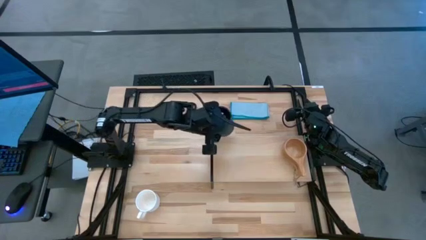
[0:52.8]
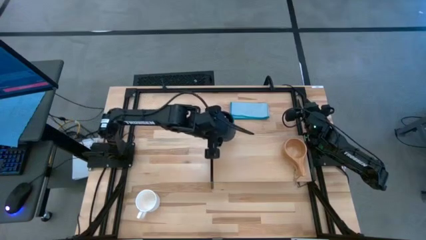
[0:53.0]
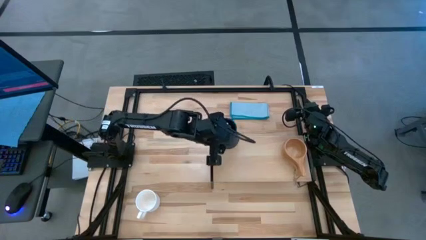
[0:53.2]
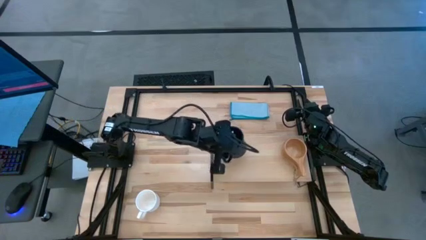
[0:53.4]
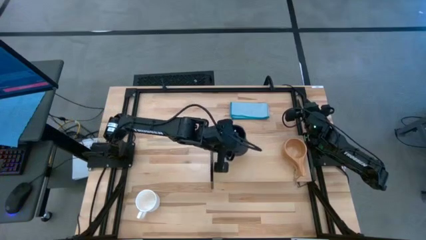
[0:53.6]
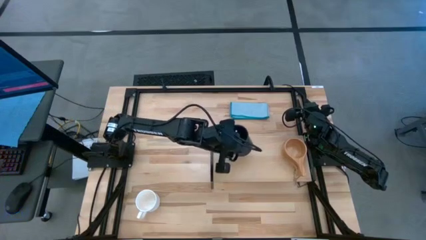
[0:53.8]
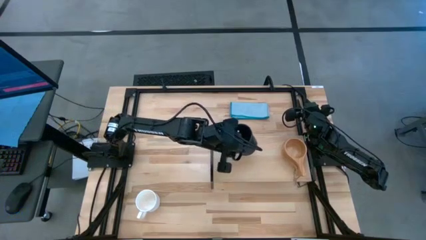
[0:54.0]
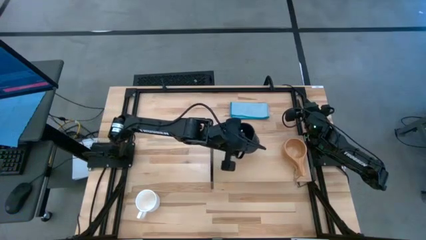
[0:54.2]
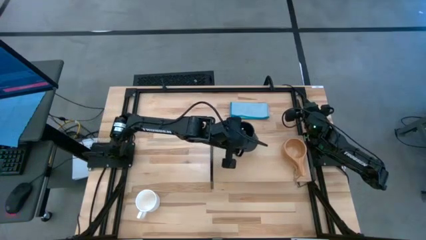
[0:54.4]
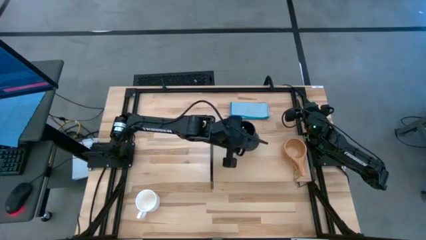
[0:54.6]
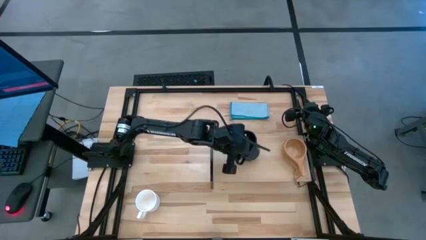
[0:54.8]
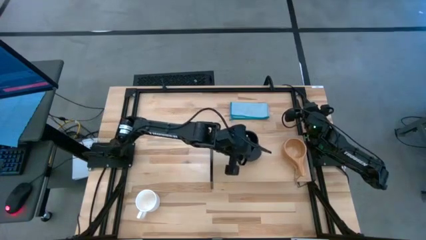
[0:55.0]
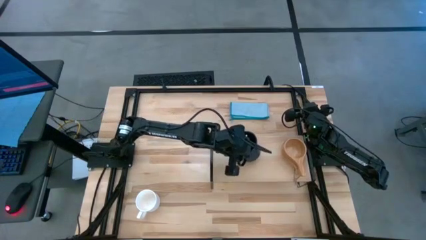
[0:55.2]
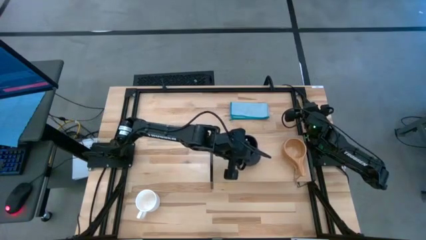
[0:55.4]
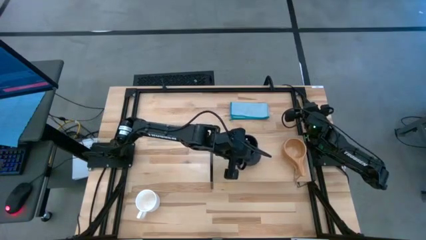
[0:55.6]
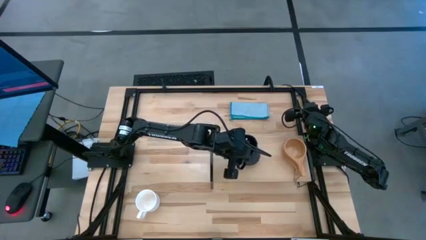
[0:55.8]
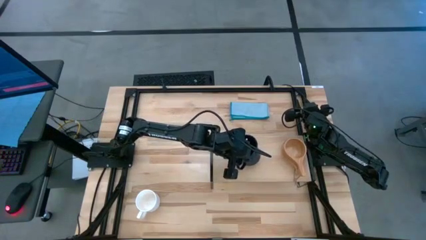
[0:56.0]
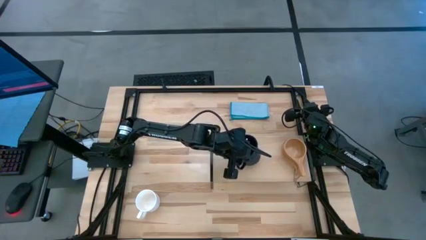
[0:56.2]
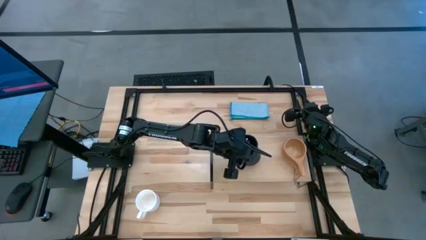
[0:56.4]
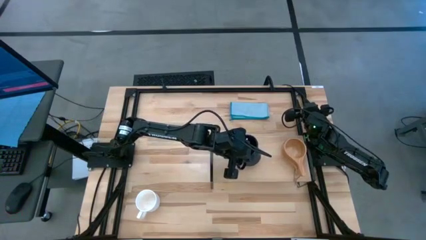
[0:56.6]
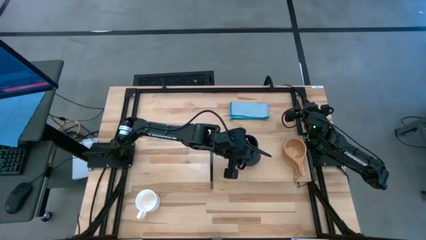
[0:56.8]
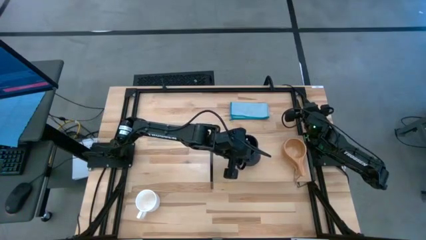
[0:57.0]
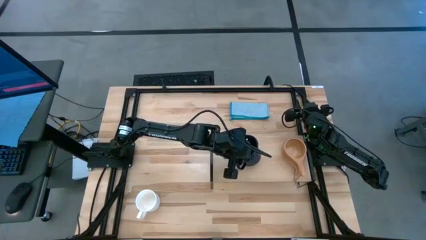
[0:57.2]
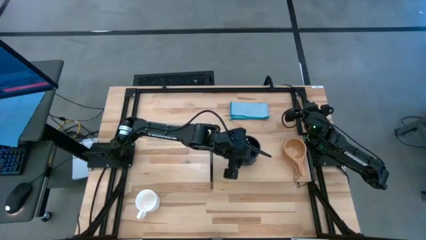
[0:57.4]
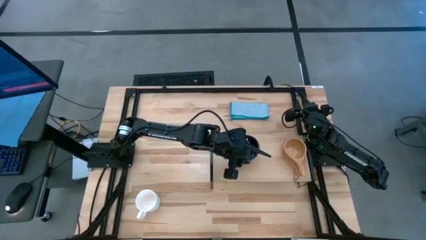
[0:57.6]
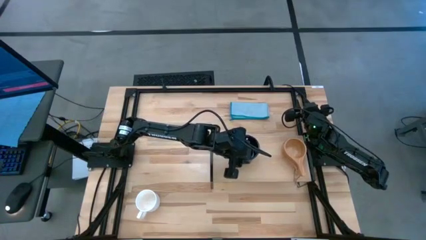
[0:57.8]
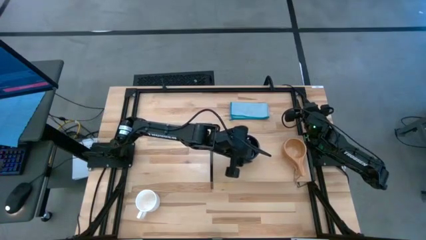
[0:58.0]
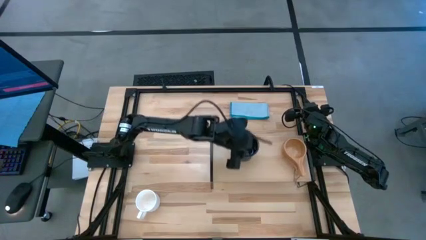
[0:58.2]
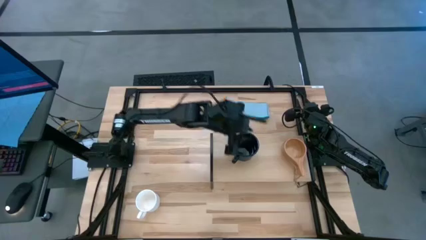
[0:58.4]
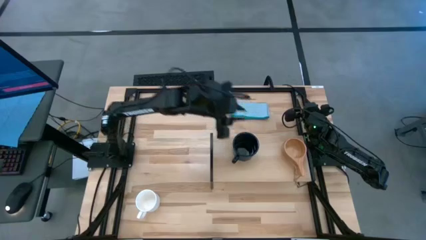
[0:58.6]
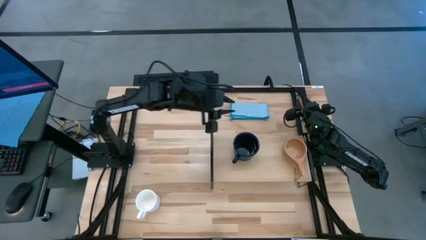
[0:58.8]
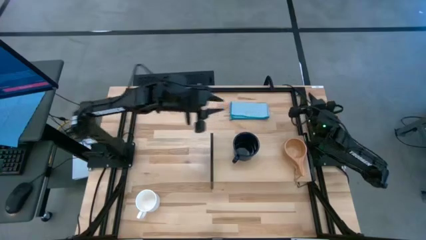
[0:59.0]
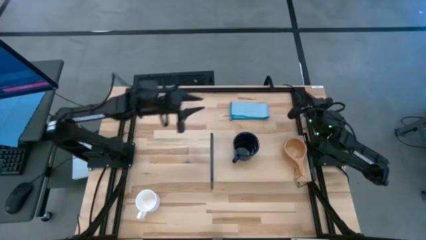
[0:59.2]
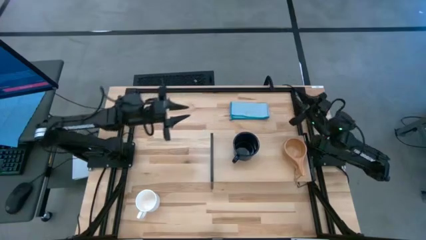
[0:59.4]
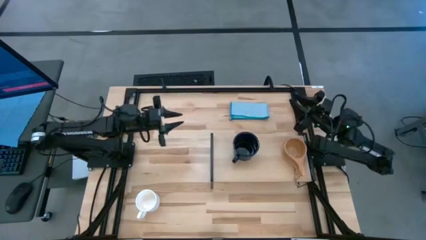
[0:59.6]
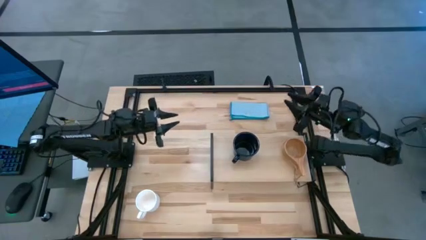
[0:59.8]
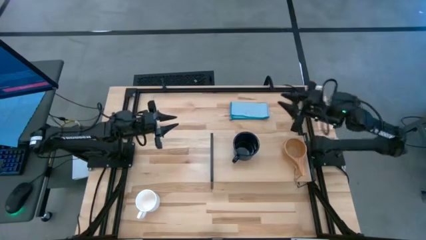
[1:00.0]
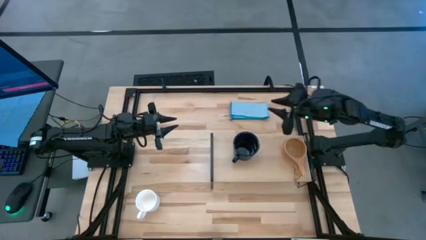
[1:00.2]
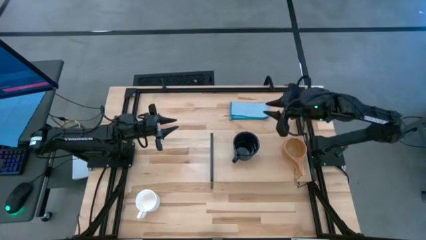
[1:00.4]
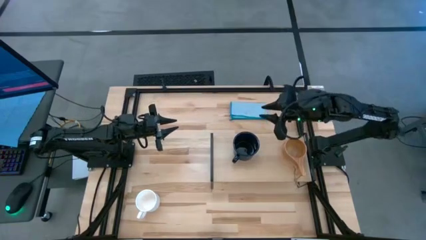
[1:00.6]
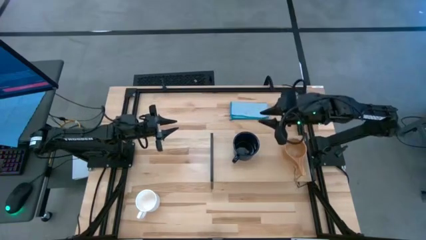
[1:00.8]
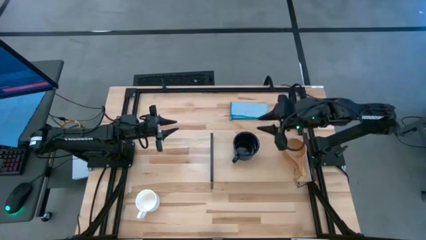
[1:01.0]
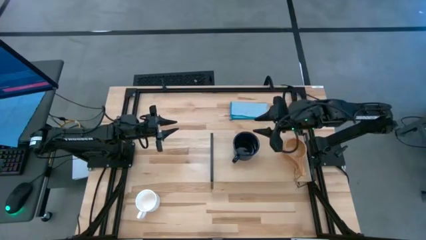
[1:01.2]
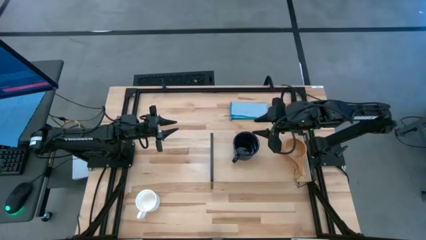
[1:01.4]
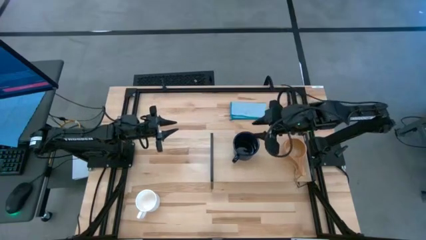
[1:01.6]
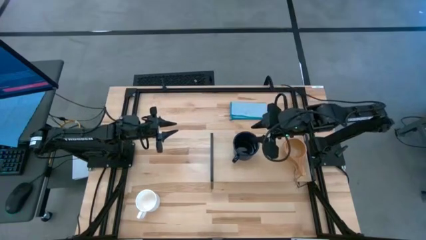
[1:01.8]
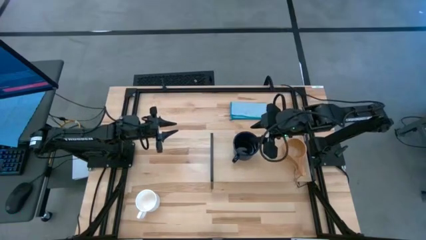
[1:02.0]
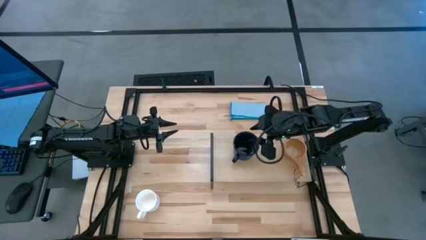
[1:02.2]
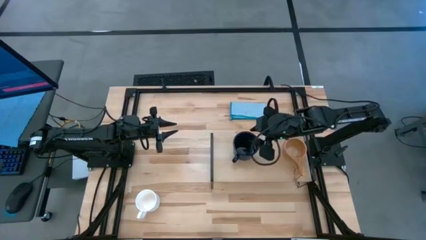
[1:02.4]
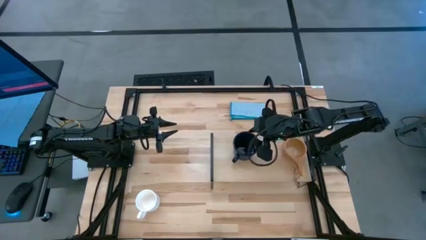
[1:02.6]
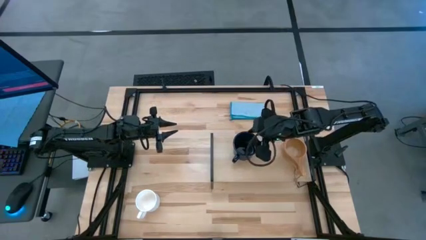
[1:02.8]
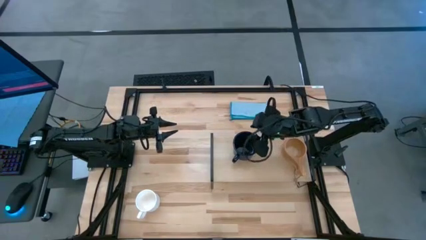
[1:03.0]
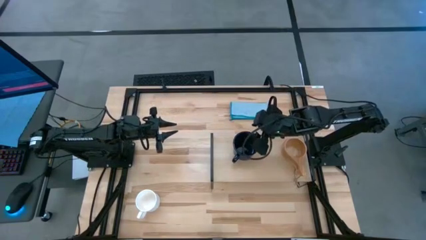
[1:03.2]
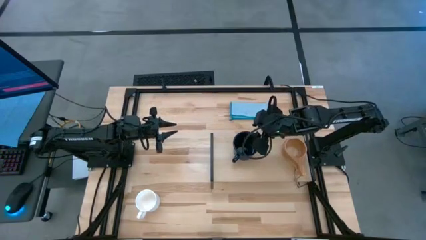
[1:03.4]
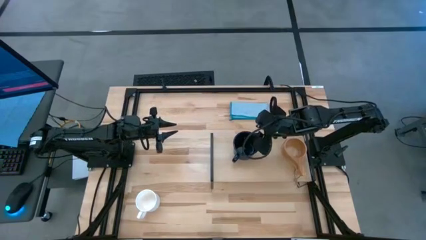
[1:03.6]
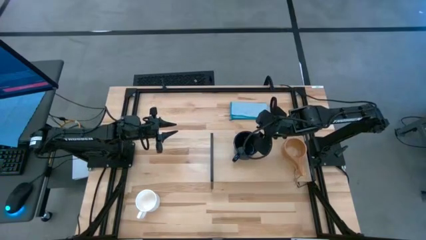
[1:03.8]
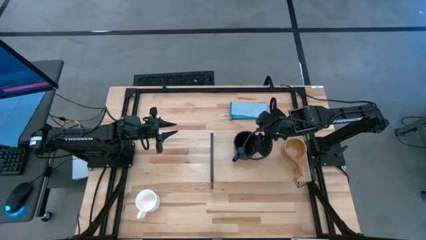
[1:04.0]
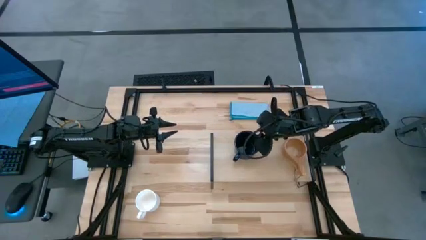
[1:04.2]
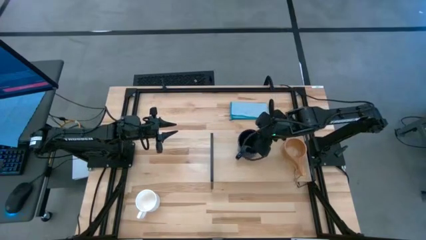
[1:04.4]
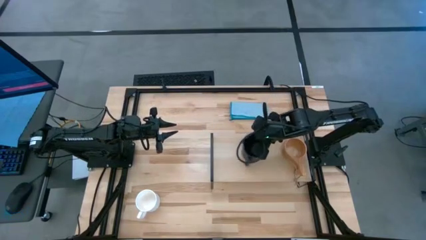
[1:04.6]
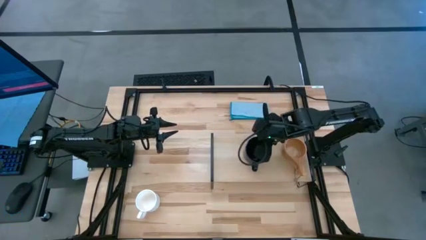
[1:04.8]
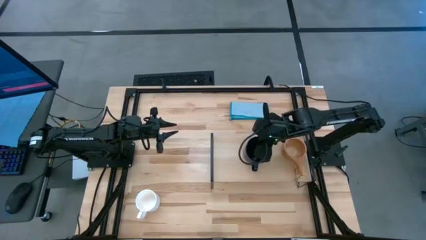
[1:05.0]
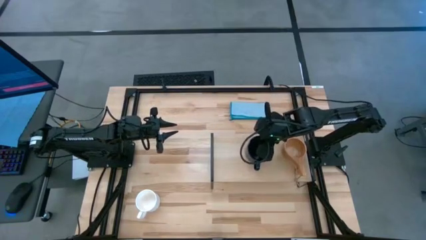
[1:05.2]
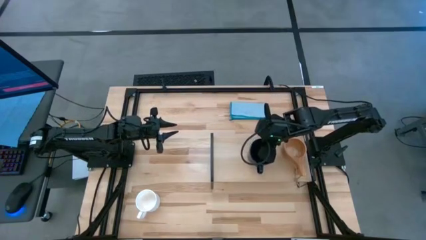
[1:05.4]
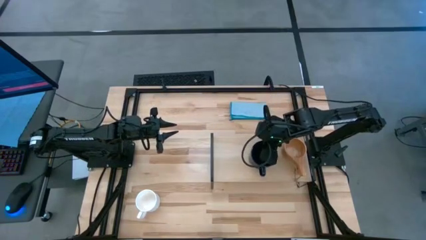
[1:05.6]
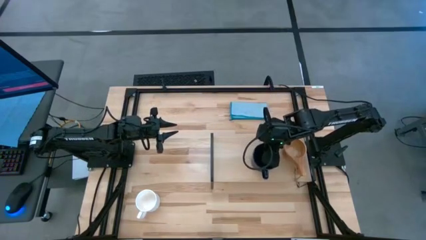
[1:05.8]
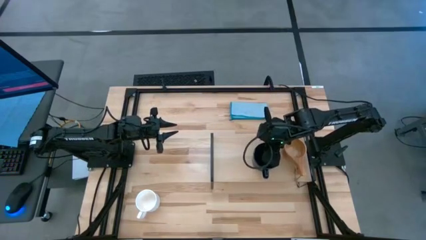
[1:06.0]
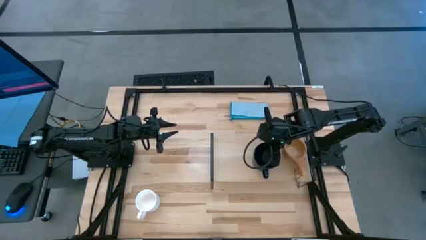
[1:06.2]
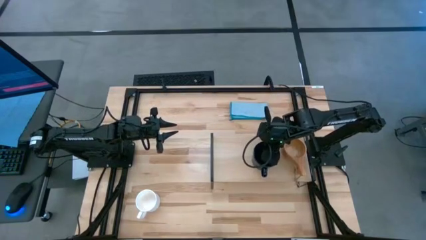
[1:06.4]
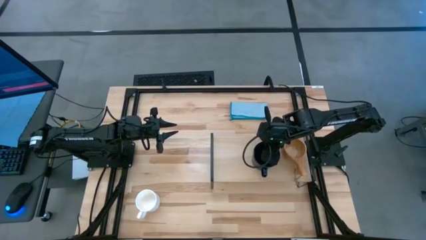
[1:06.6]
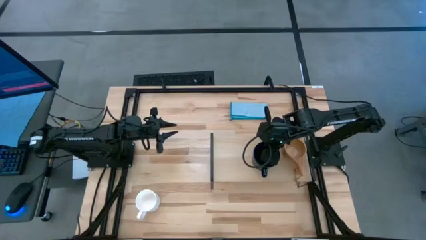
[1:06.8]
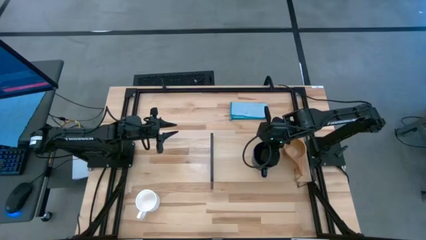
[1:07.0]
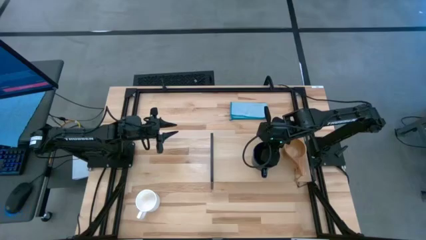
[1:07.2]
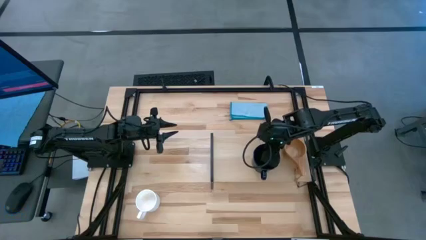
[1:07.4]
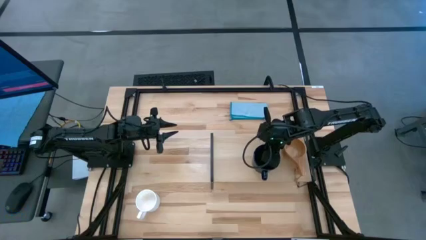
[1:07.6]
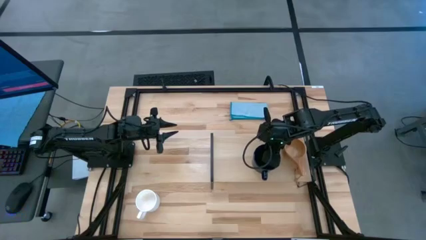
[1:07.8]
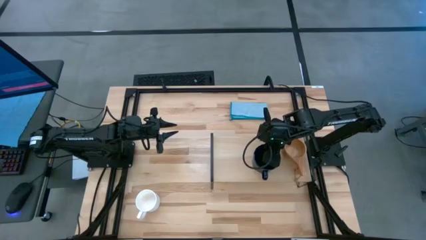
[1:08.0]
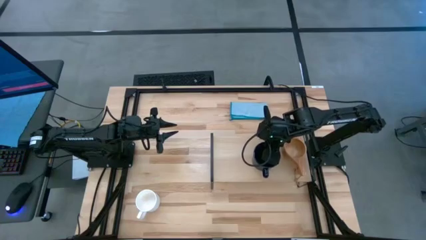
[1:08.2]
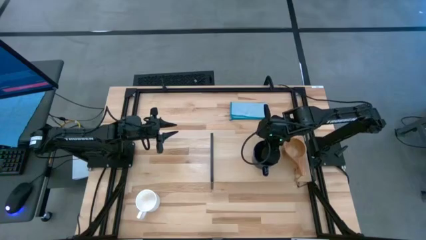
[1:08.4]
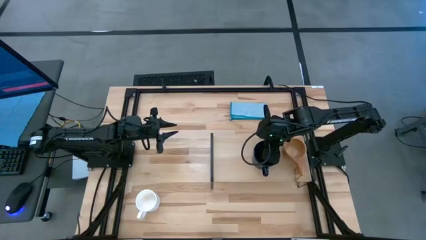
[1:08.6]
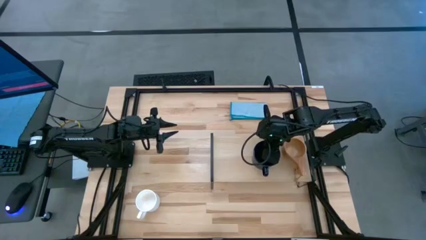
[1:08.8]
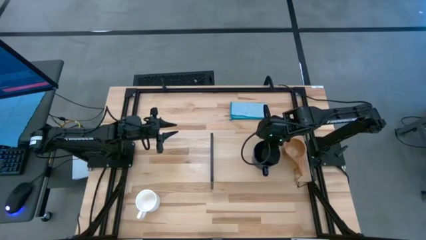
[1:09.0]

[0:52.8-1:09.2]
Task: Stack small to large cups/mugs on shelf
Put the black mug on the shelf
